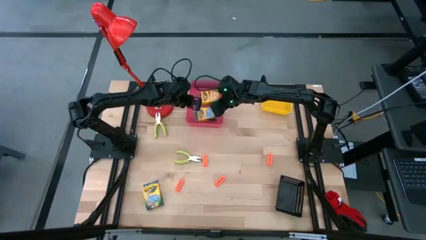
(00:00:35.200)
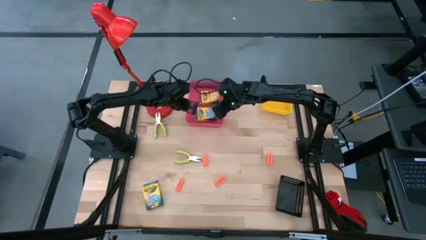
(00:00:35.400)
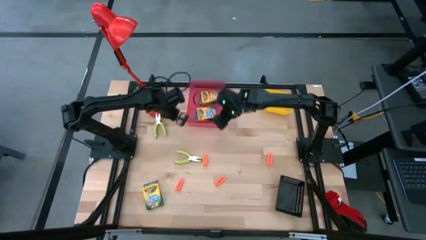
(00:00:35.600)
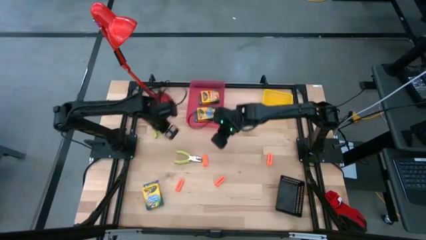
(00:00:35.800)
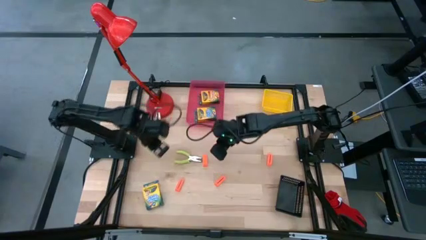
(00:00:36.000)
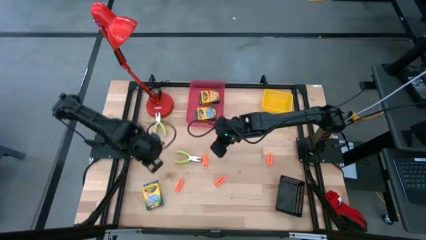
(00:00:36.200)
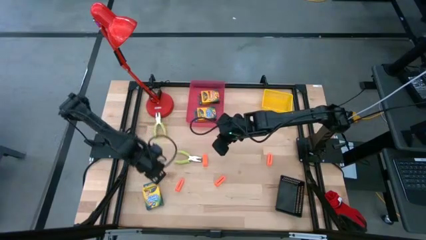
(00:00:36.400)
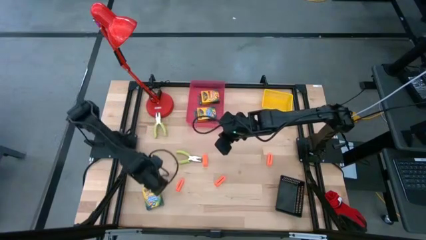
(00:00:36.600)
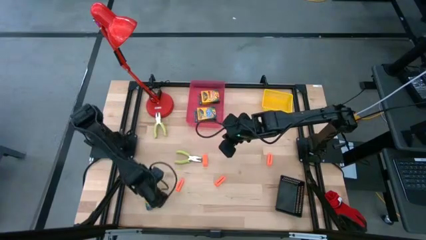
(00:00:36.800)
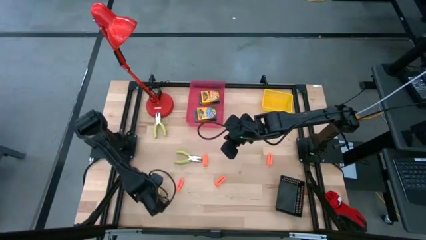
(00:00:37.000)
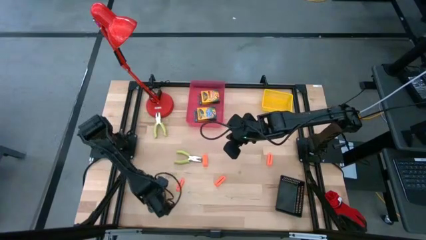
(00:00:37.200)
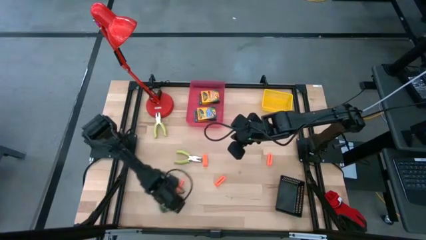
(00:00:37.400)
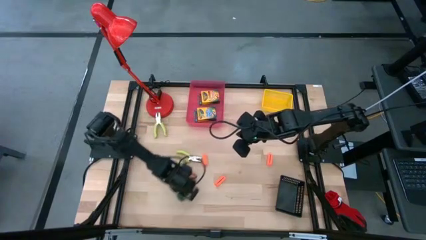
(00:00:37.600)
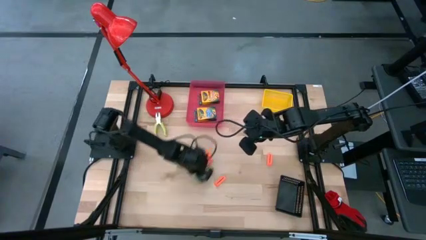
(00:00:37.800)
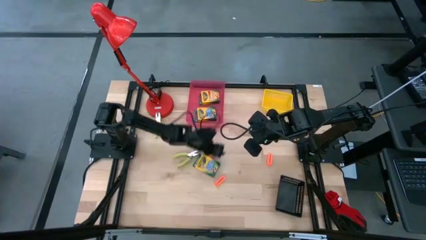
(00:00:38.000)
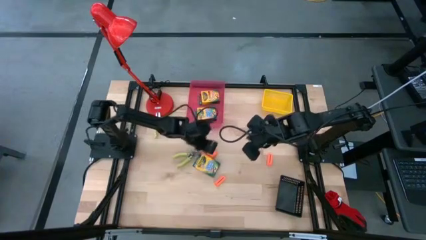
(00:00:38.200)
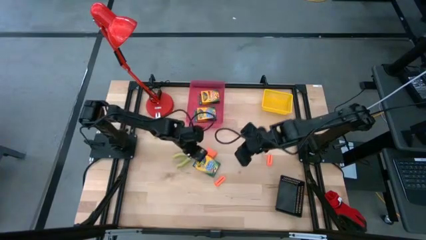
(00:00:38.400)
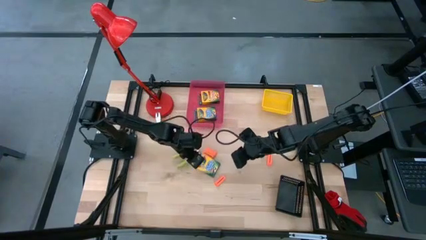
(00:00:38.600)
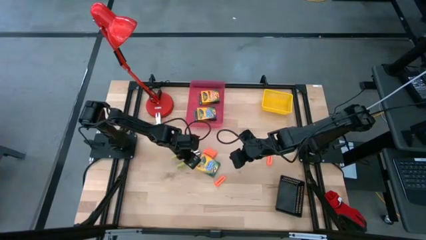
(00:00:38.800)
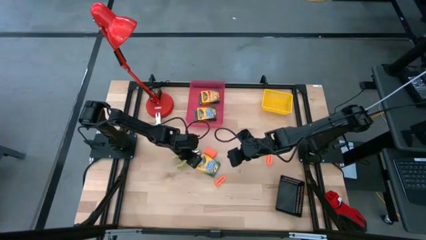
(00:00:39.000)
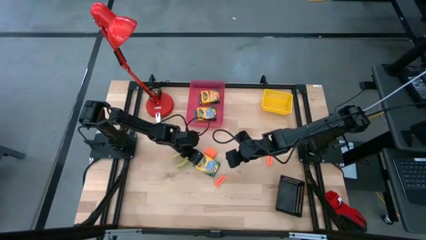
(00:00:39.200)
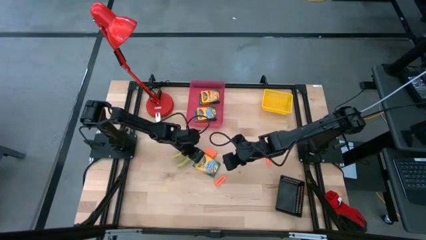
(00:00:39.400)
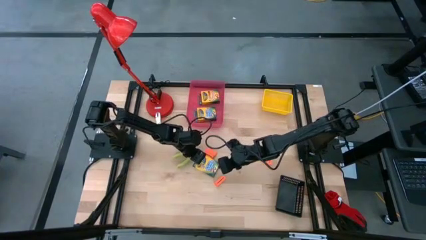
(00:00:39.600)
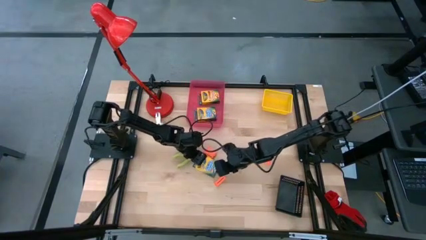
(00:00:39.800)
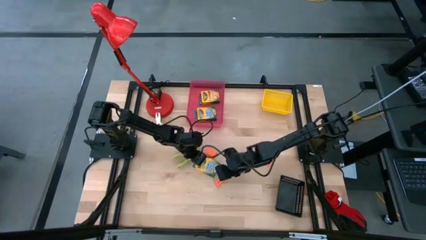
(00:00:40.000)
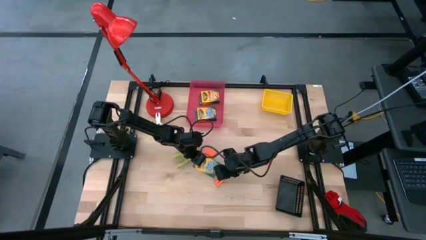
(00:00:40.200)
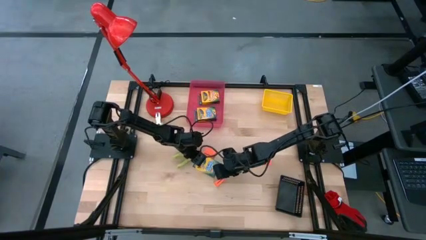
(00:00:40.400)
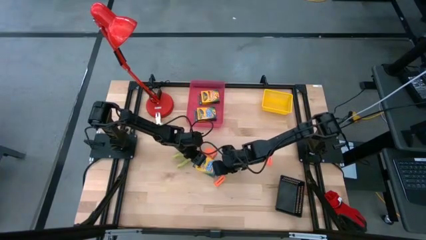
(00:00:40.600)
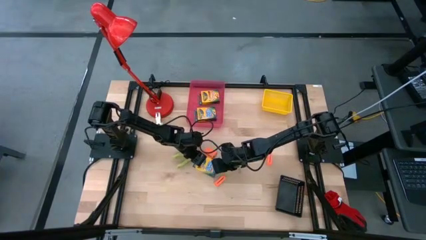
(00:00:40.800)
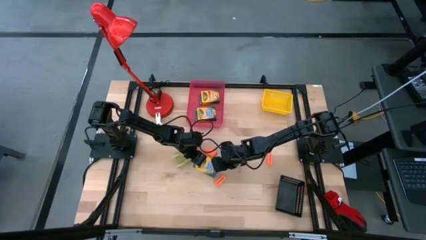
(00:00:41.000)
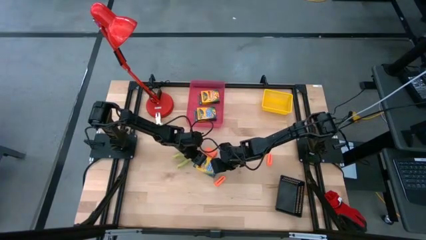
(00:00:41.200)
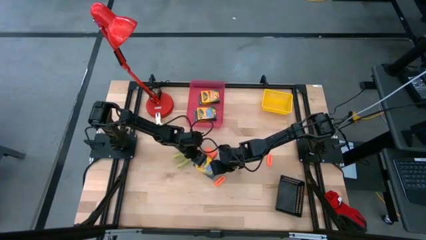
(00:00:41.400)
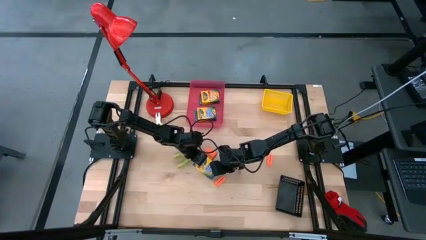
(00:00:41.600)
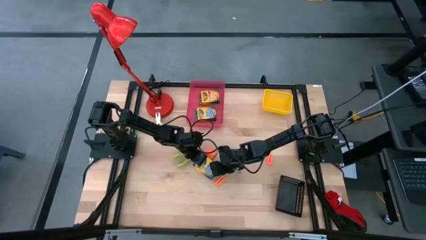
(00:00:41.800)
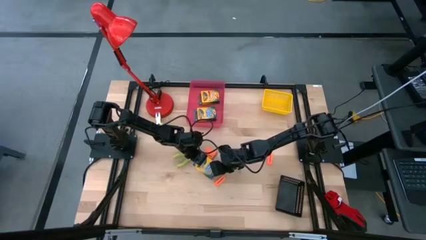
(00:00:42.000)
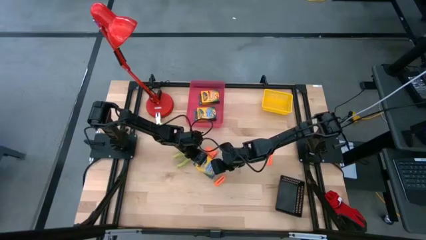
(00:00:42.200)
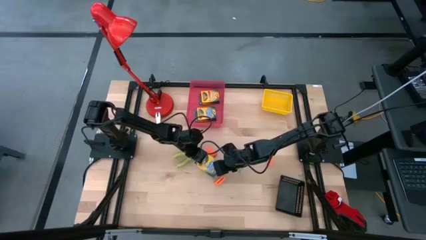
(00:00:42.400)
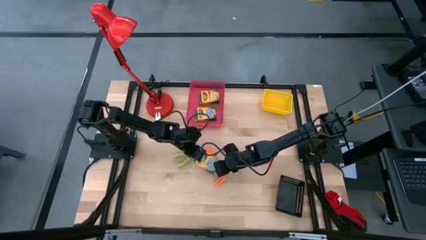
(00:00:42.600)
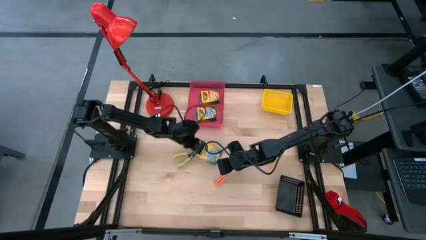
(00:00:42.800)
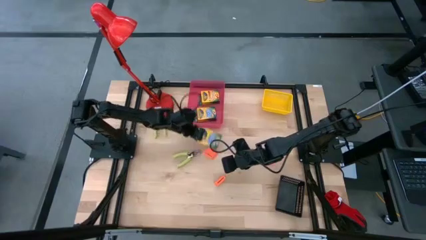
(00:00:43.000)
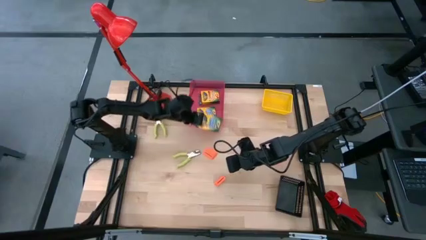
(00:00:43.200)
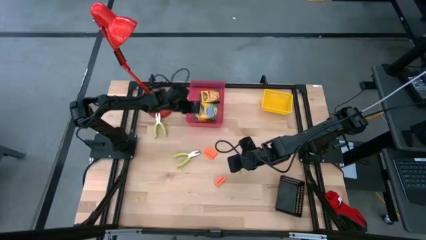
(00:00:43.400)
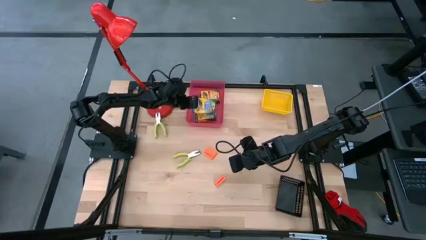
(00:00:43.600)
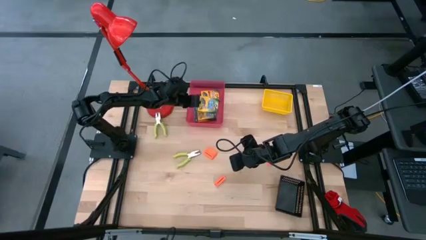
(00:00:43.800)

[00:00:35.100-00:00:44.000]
Task: Pick & Place School Supplies
Put the yellow crayon box into the red bin

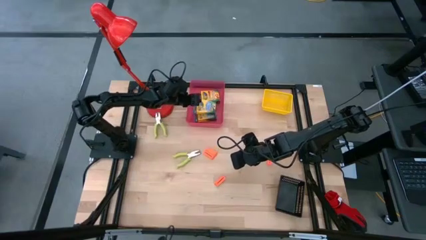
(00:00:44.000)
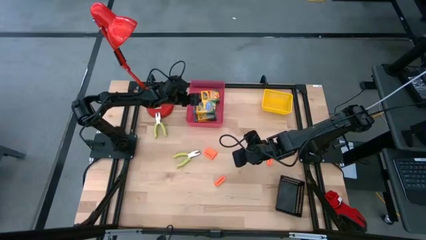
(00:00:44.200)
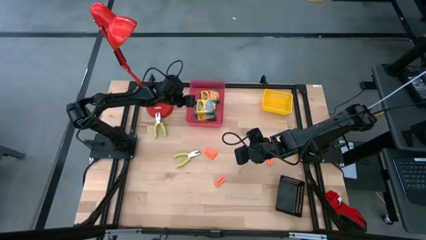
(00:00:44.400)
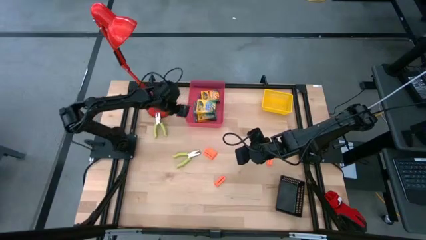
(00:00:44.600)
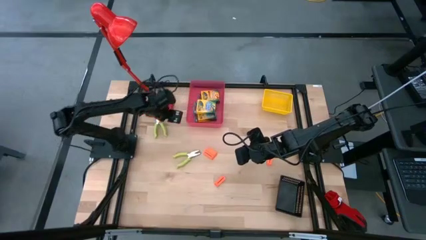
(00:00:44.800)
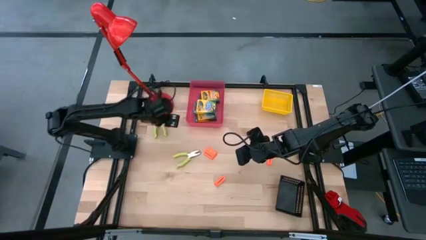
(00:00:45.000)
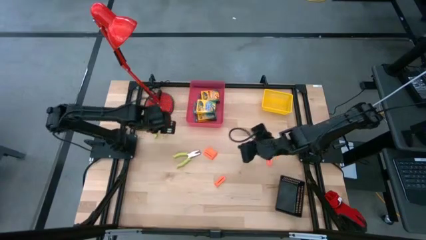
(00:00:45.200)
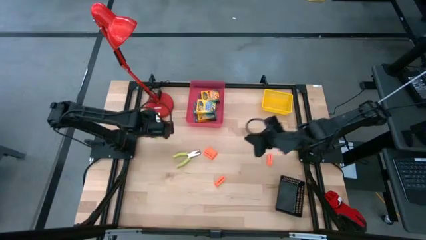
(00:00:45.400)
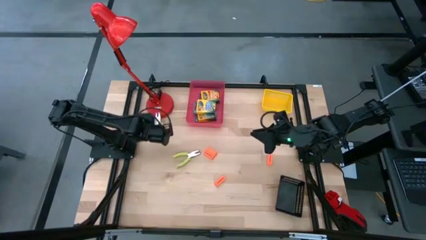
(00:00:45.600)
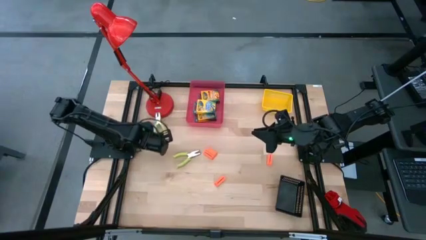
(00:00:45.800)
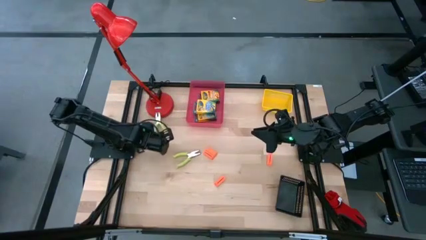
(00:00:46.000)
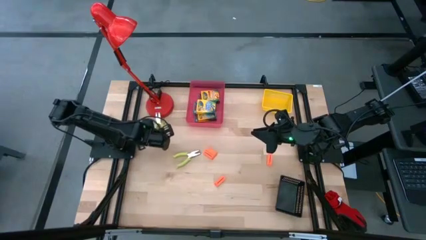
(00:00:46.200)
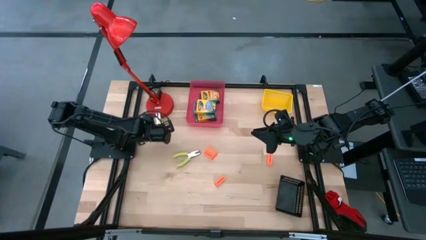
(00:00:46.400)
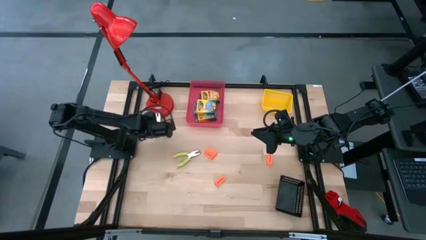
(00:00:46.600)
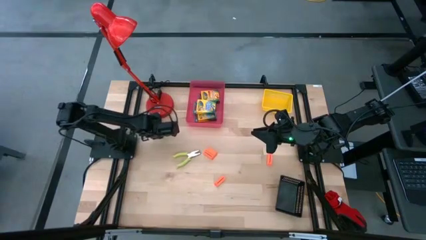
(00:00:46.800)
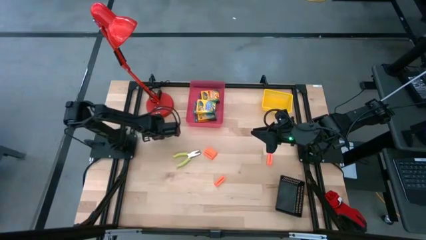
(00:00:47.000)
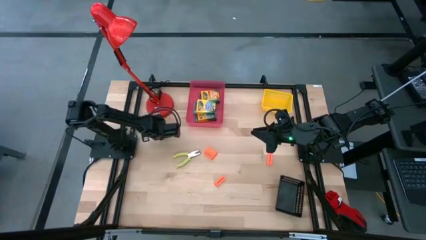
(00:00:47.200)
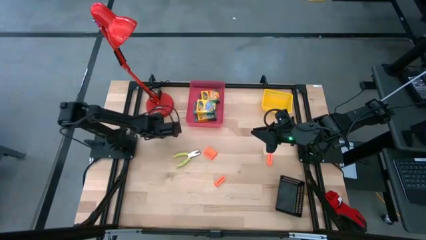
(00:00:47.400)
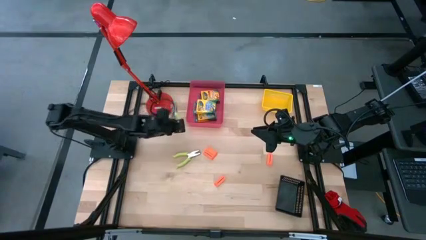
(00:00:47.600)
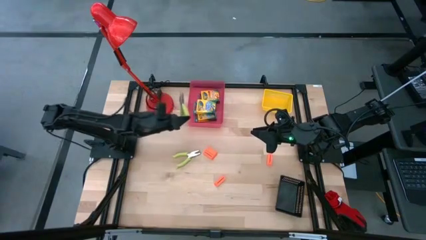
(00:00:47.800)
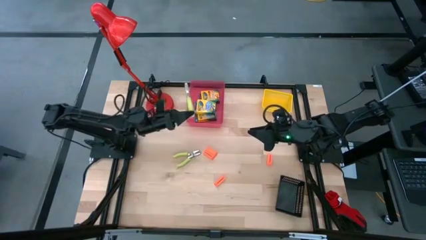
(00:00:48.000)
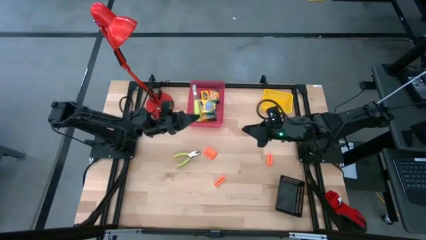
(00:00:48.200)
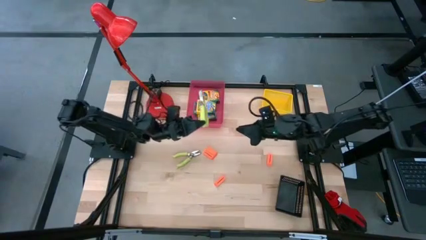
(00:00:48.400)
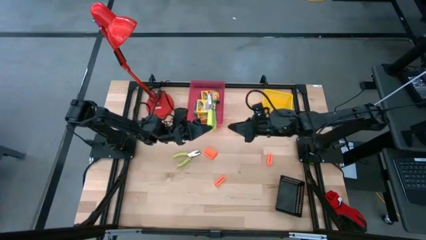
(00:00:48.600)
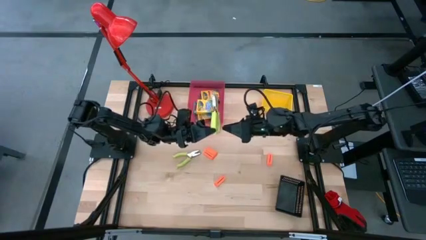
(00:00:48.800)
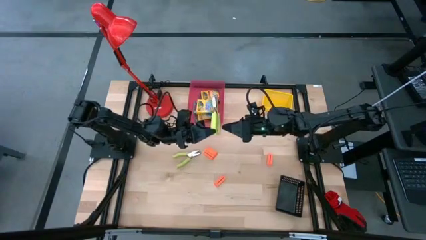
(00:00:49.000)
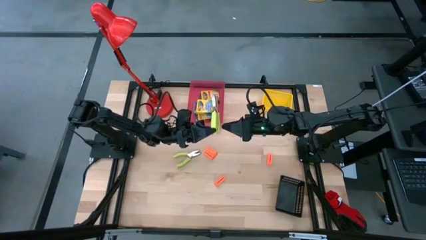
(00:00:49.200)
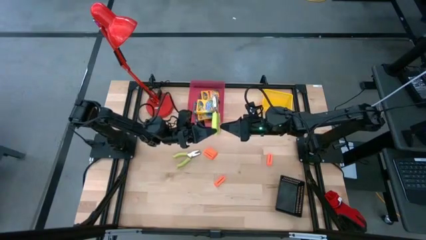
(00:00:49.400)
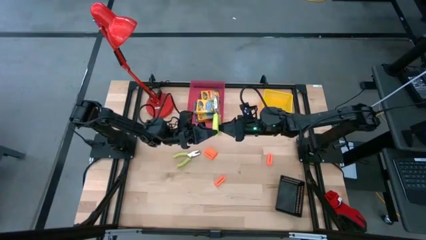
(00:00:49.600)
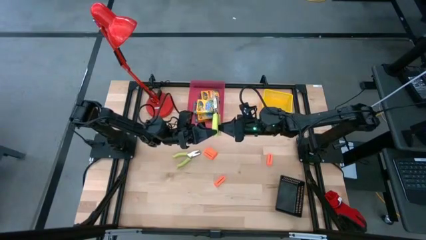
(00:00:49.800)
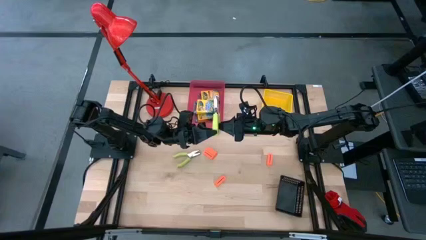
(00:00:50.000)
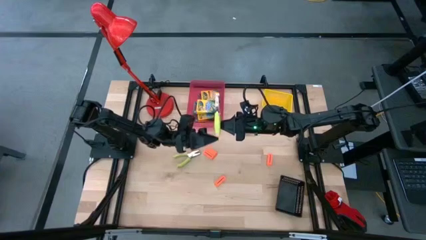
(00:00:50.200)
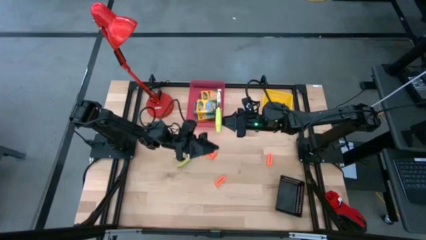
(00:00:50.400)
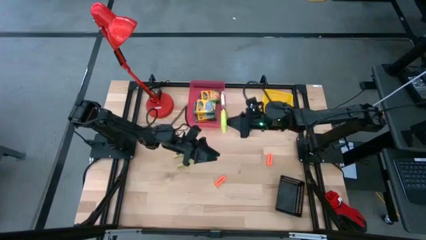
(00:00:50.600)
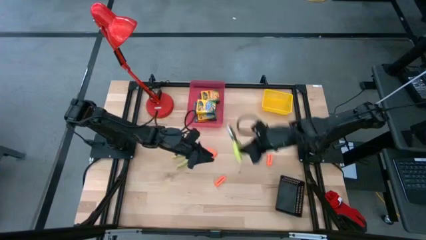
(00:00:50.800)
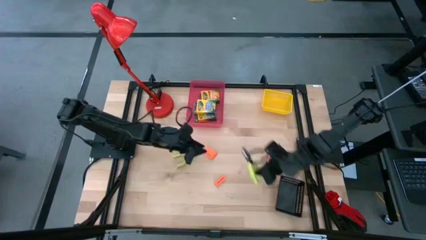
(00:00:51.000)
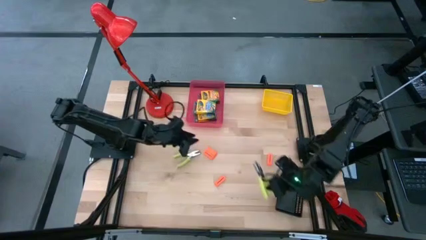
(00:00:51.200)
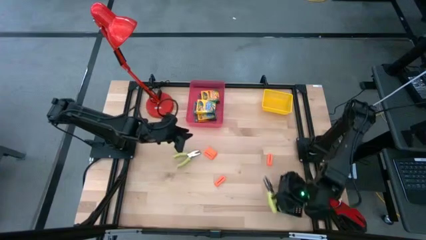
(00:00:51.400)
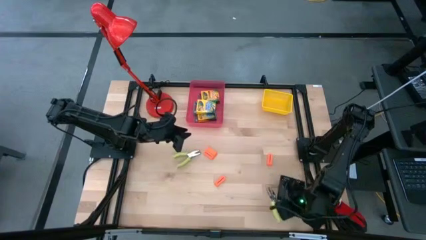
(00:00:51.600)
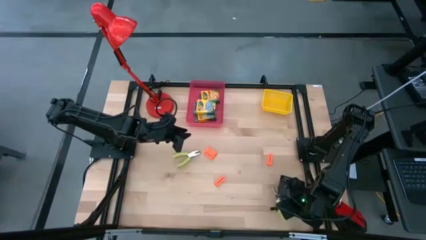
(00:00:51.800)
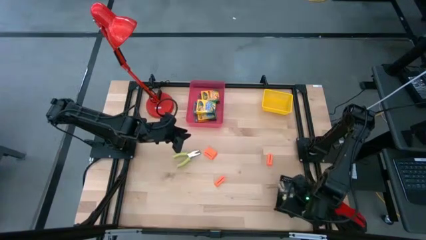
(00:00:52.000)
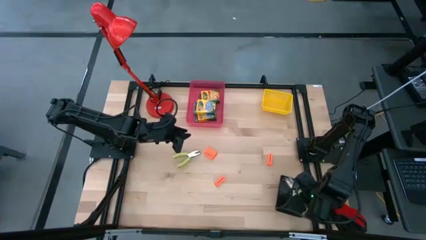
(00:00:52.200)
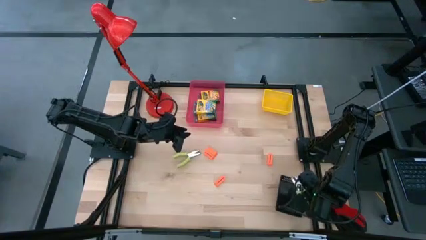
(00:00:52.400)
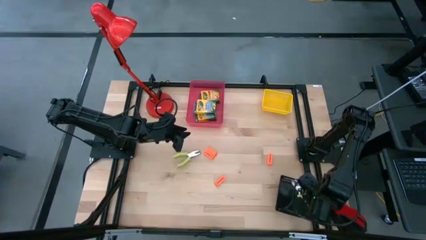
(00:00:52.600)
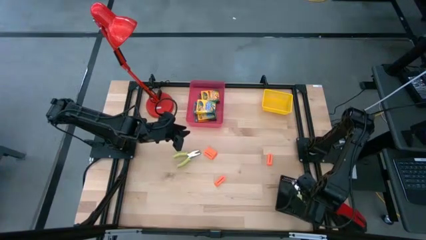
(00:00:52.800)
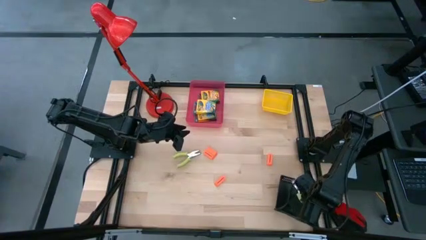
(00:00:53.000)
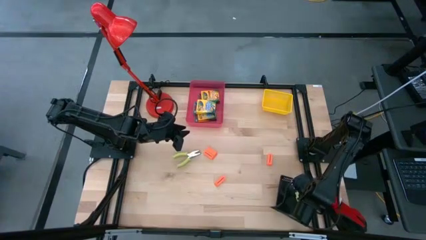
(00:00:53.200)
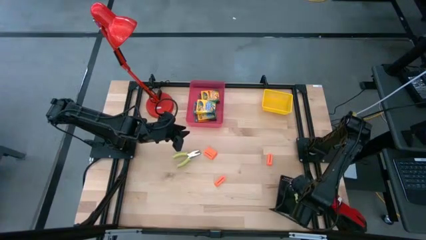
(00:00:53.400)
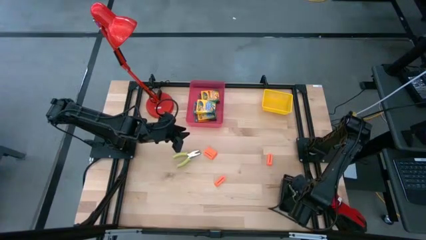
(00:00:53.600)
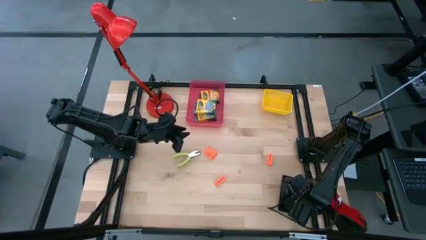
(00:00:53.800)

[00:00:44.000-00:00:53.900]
Put the green puncher into the black bin
